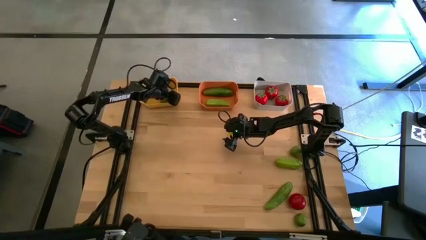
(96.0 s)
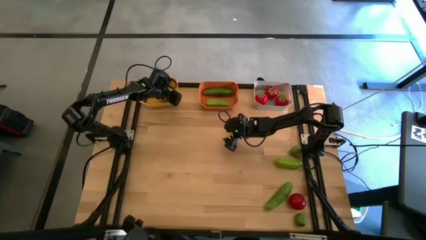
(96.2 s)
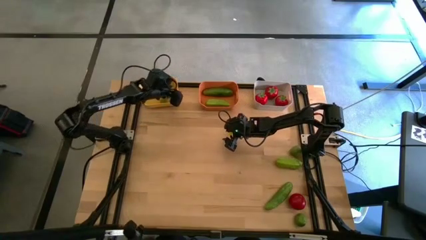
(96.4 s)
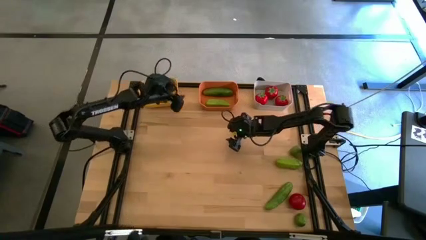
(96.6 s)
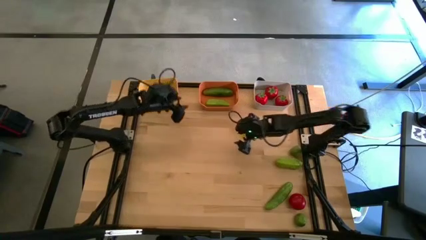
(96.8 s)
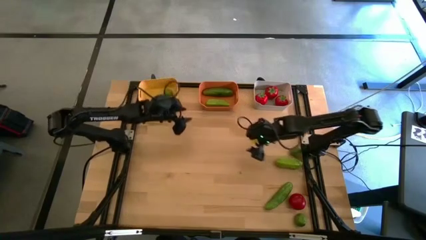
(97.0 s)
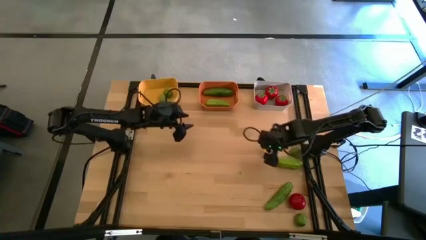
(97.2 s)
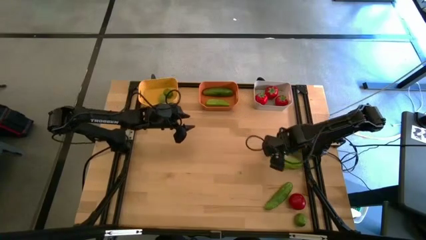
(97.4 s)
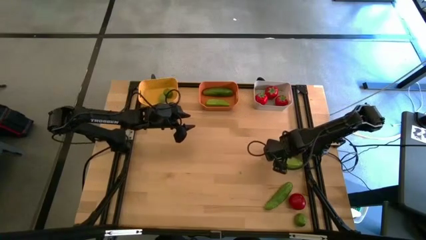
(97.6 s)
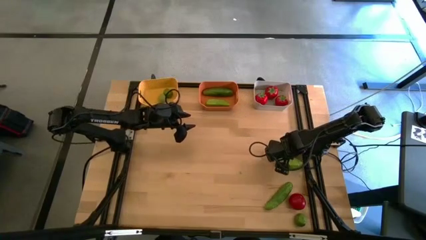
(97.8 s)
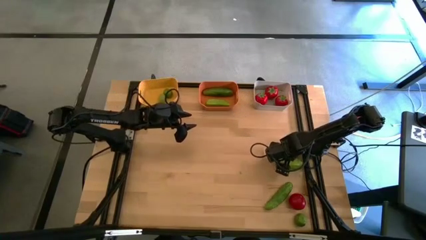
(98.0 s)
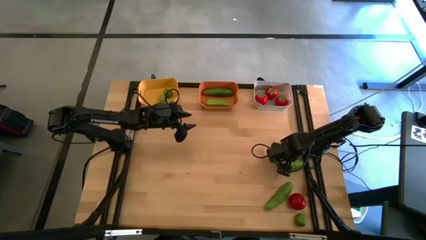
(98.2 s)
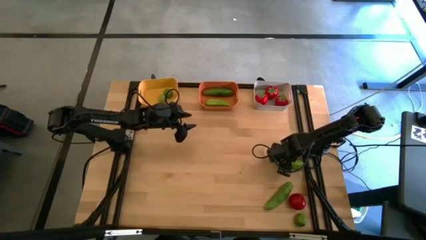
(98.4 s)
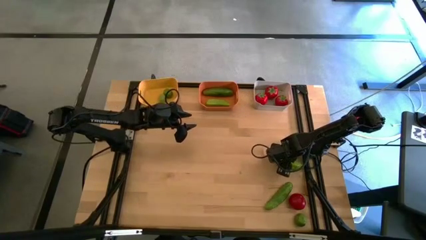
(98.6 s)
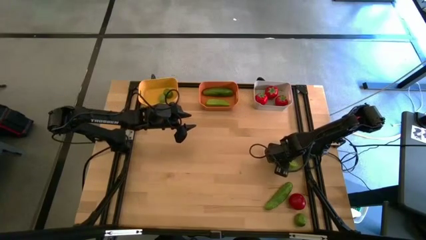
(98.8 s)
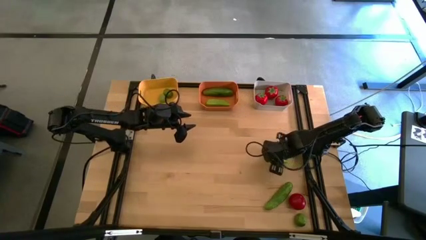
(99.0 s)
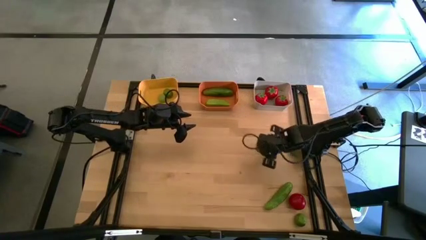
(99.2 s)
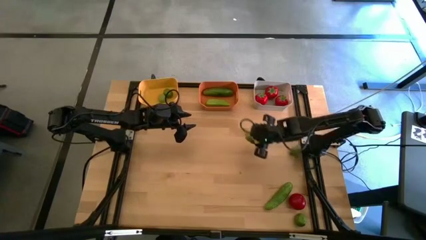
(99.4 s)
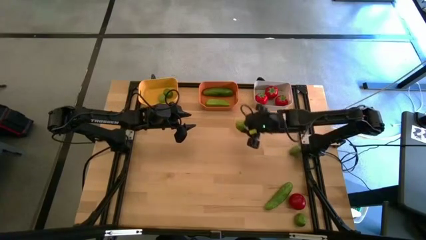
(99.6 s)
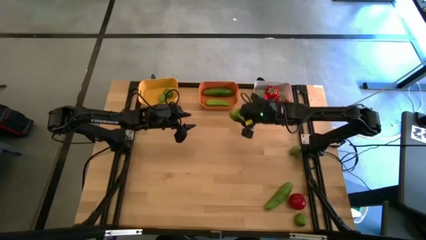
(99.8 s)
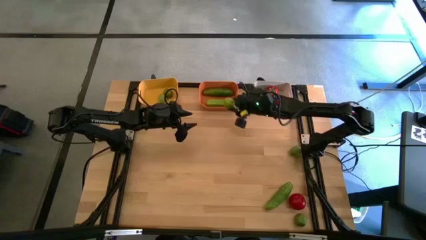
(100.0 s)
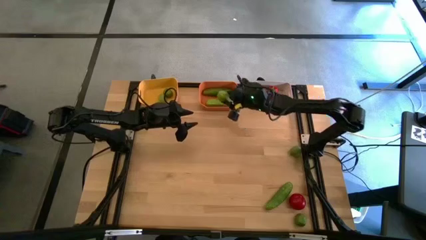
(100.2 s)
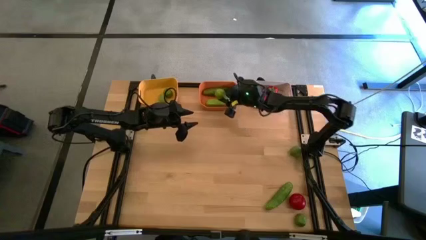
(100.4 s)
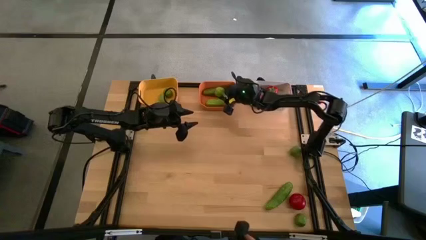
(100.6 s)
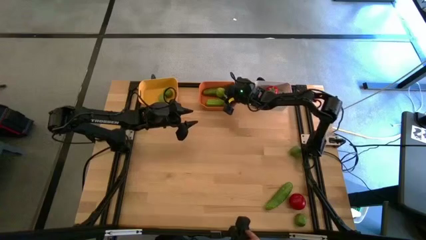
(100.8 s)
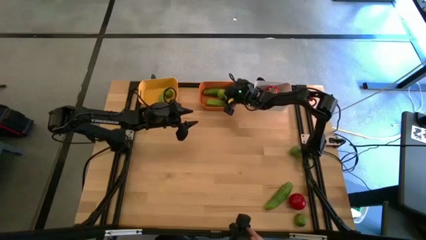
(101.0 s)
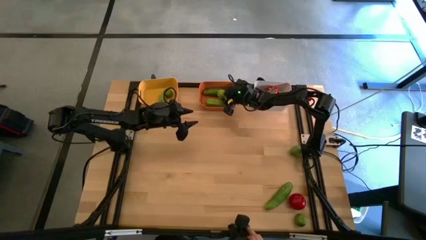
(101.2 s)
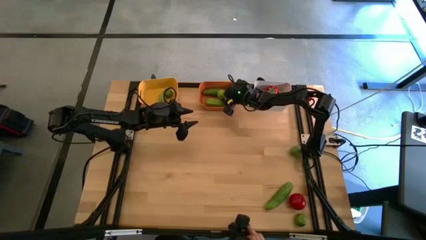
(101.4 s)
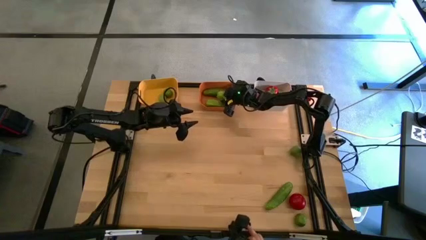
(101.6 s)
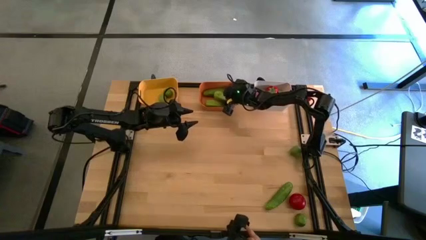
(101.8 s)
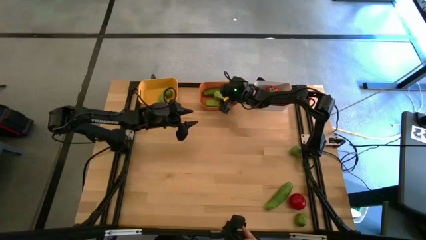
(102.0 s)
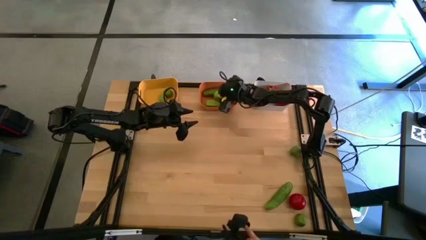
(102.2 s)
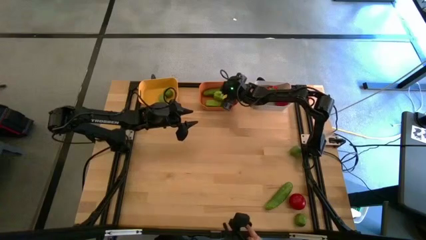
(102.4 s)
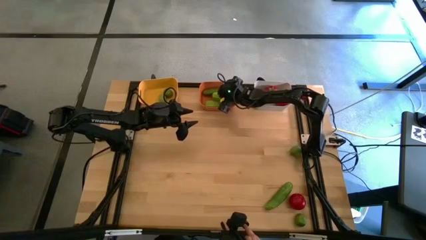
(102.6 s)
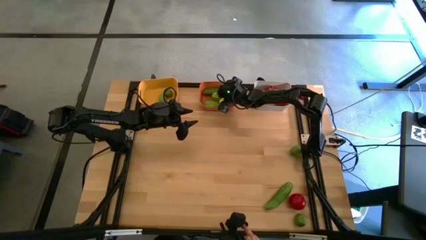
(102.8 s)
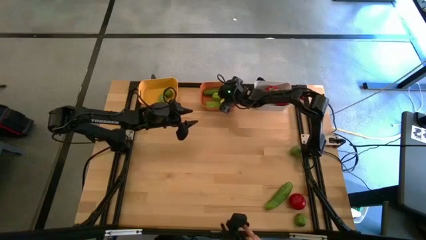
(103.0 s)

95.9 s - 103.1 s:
Task: Sort produce into baskets
Put the cucumber into the orange bin

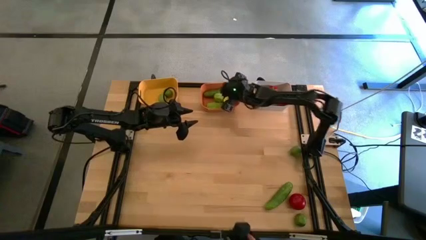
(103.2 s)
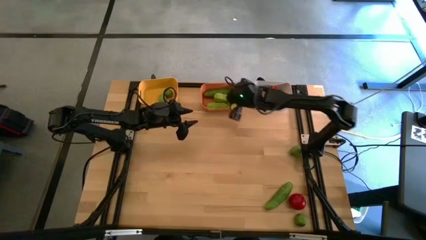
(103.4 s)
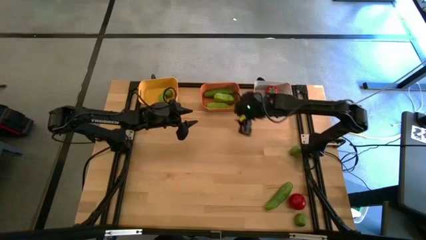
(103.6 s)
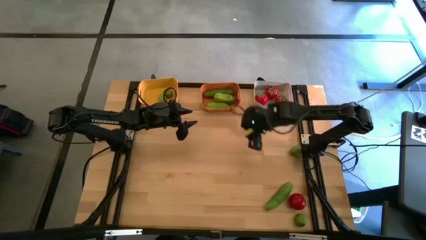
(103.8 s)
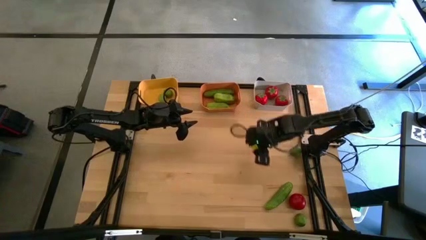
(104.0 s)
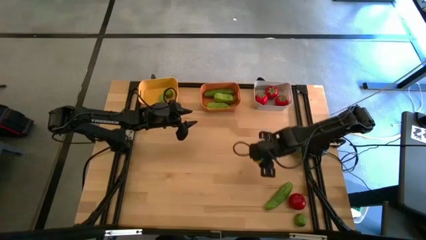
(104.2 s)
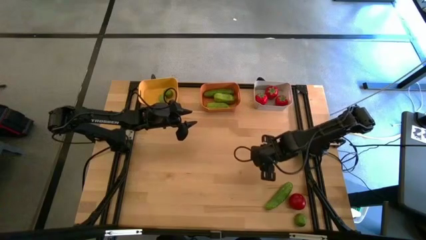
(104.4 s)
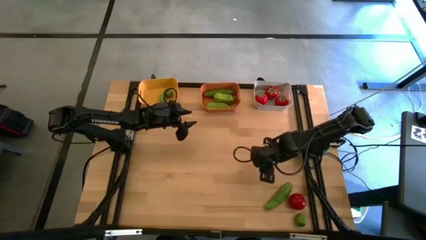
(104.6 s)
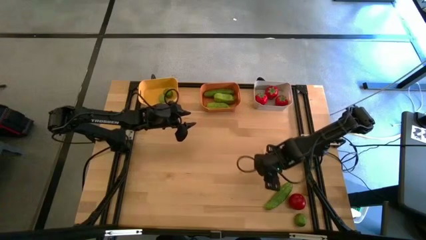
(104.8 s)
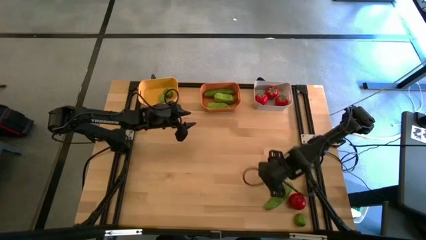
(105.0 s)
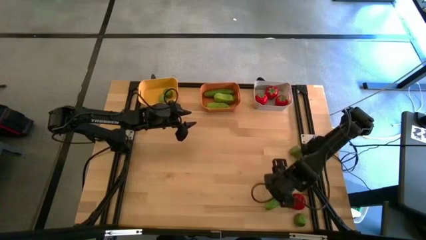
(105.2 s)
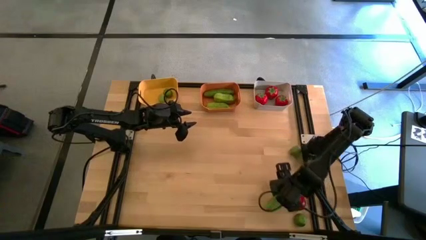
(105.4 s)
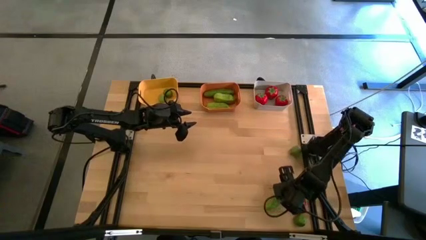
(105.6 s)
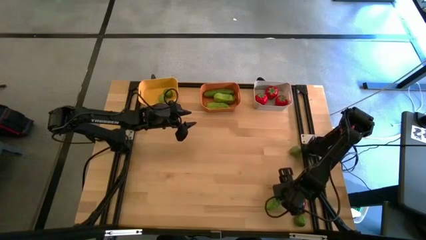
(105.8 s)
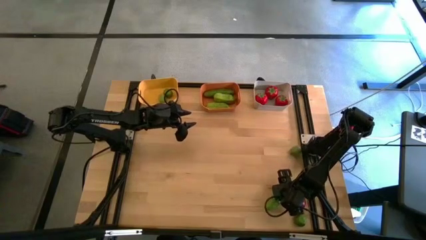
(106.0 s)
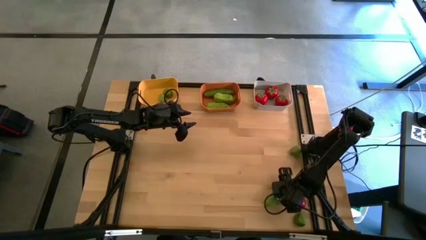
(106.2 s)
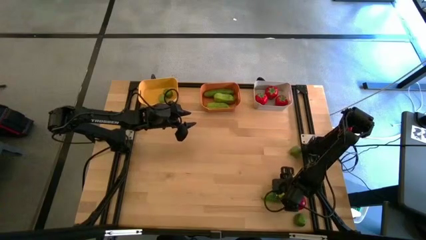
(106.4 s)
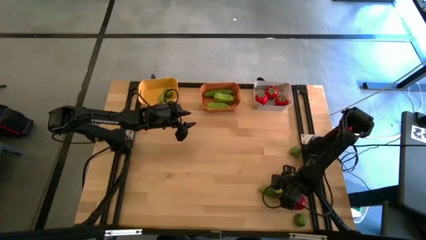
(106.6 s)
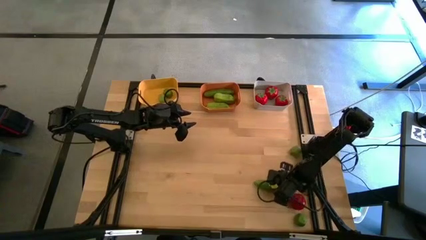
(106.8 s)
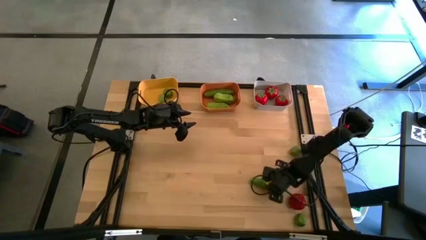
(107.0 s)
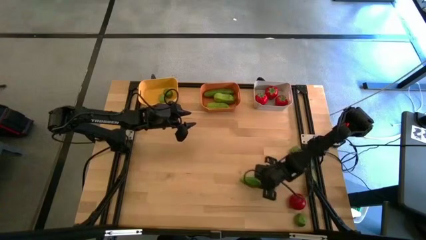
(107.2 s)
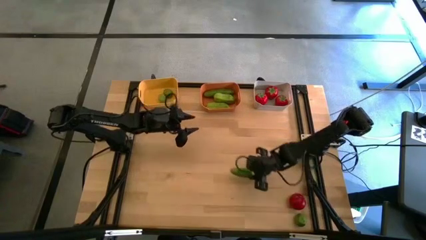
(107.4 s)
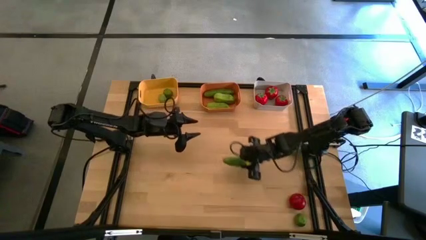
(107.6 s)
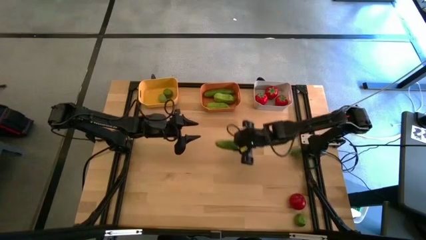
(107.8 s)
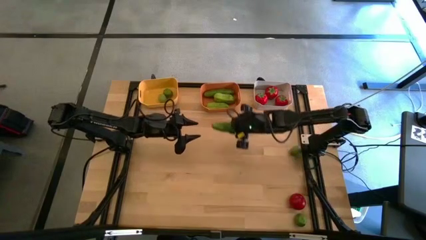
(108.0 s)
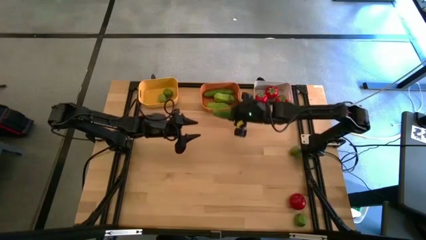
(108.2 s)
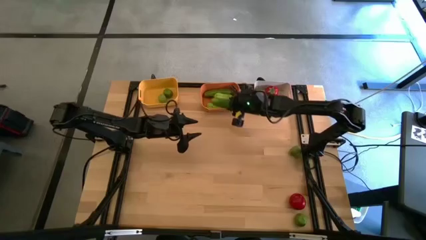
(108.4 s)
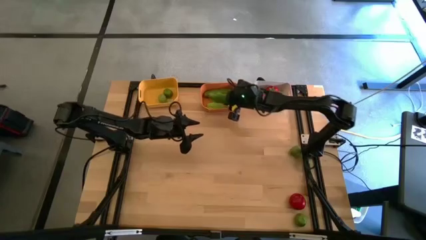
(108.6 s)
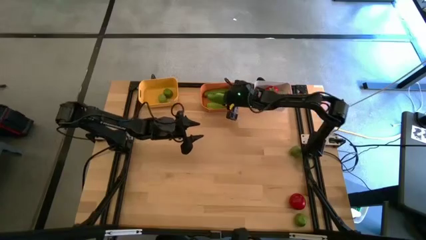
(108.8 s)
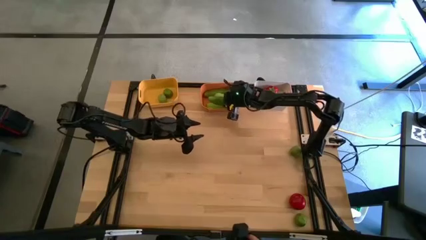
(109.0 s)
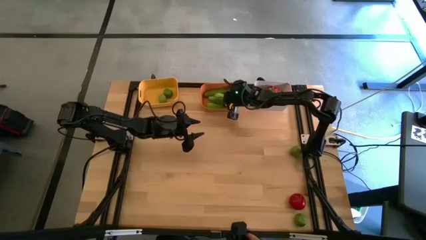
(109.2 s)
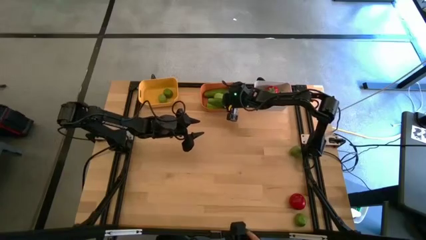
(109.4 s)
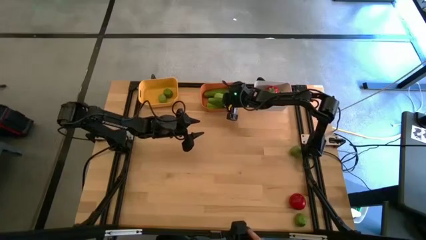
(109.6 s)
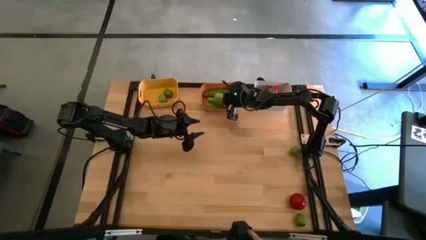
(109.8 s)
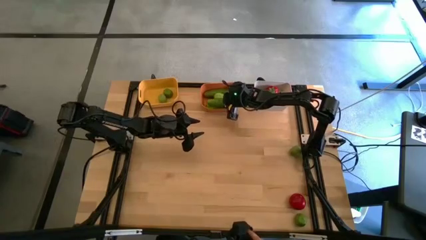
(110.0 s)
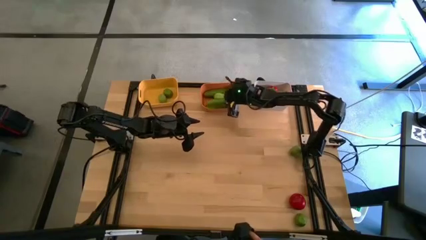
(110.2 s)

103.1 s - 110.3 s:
Put the cucumber into the orange bin
